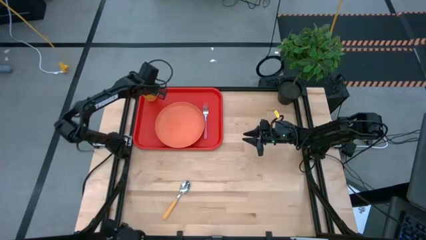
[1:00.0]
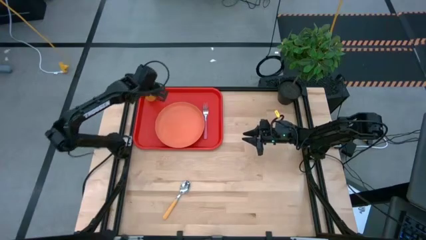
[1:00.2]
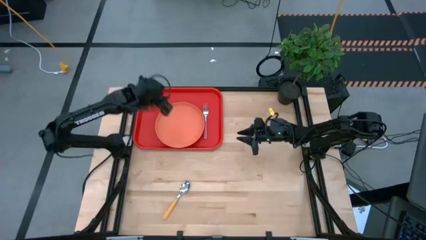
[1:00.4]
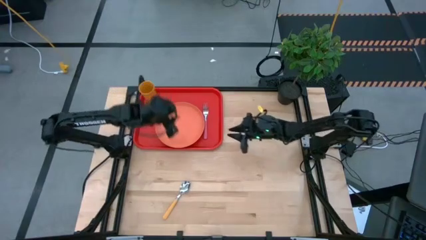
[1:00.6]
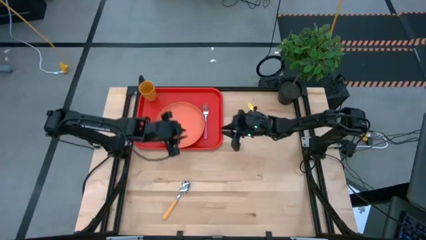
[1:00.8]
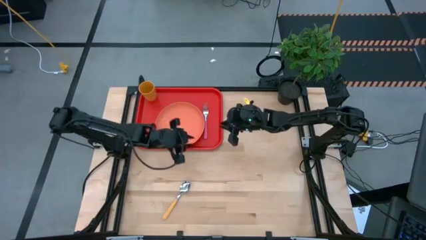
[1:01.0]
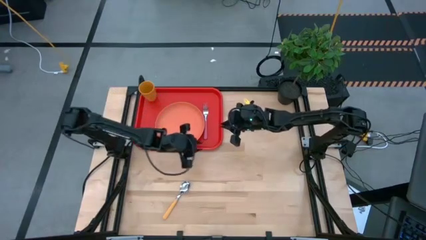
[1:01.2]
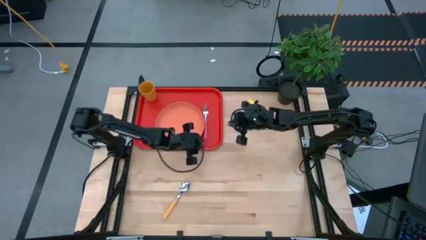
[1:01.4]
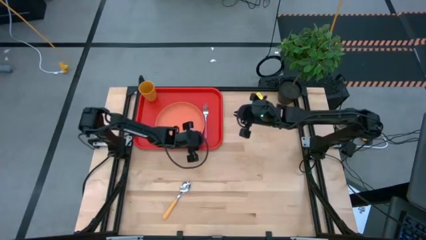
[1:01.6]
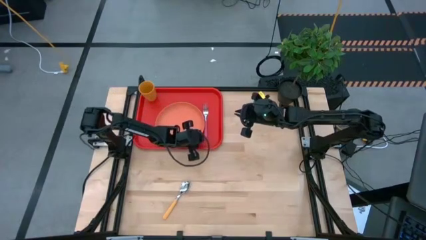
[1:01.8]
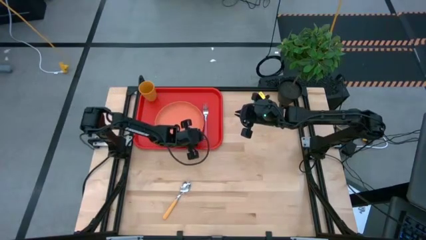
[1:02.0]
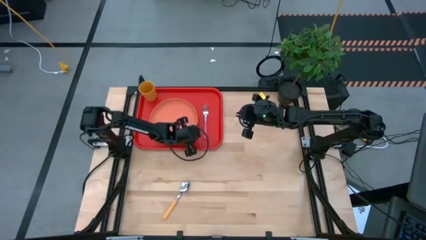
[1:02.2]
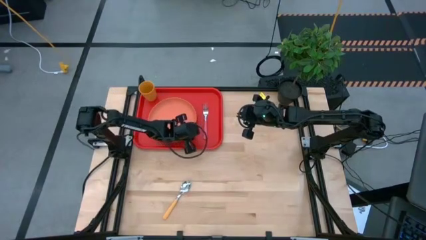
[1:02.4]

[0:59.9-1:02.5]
Task: Pick and place plate/cup/fork/spoon on tray
Adjust the orange plate

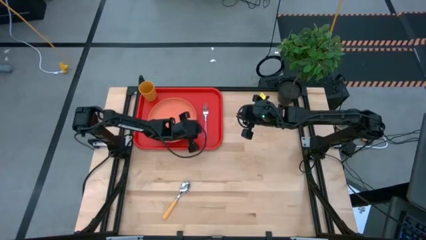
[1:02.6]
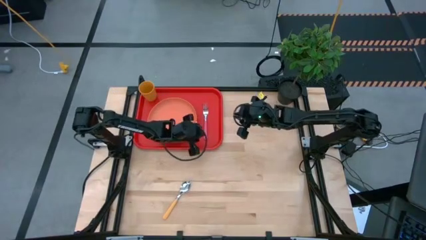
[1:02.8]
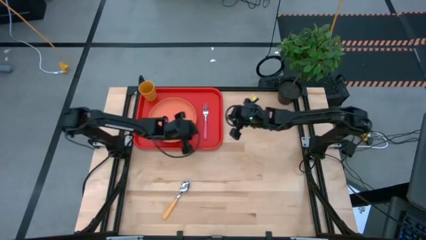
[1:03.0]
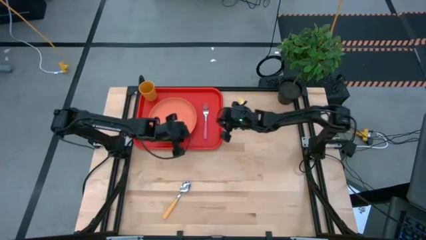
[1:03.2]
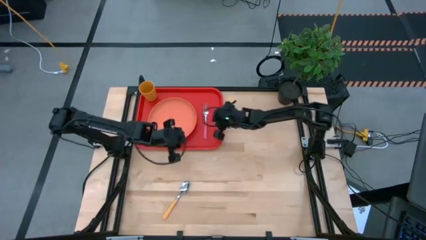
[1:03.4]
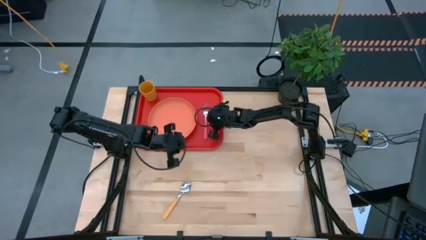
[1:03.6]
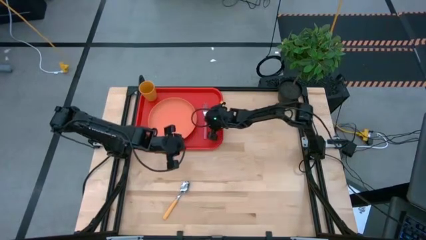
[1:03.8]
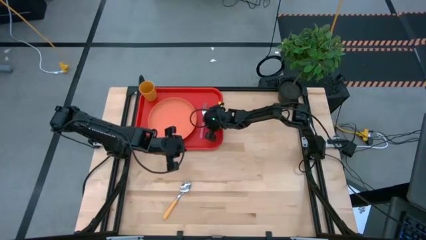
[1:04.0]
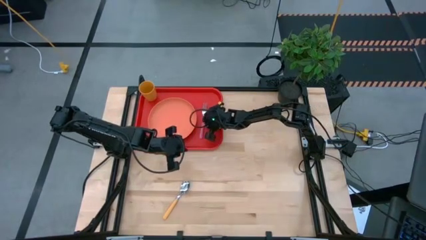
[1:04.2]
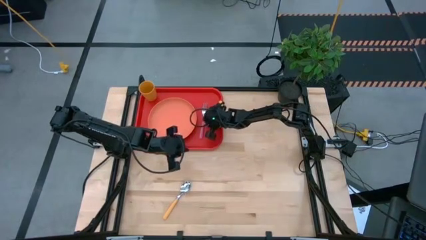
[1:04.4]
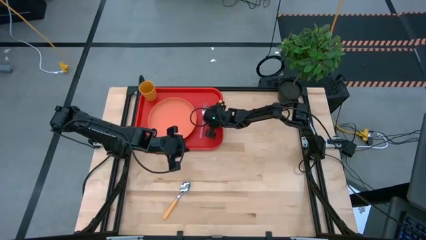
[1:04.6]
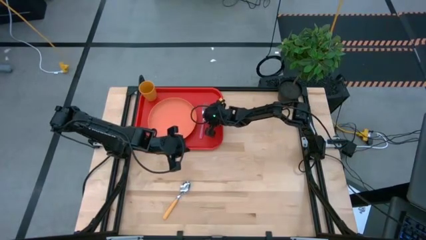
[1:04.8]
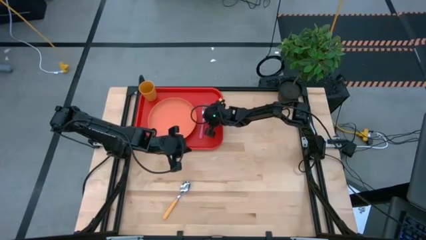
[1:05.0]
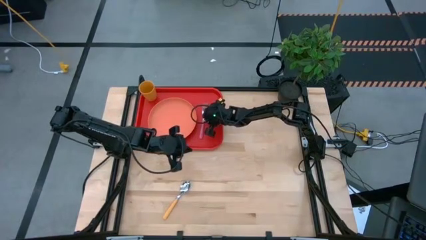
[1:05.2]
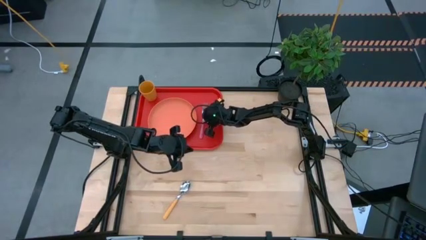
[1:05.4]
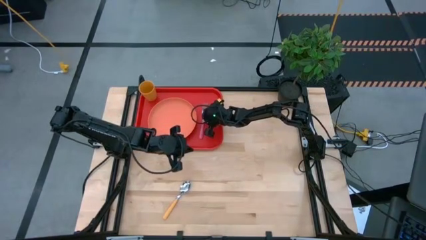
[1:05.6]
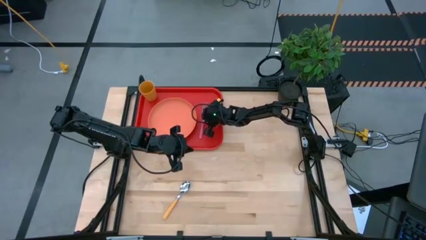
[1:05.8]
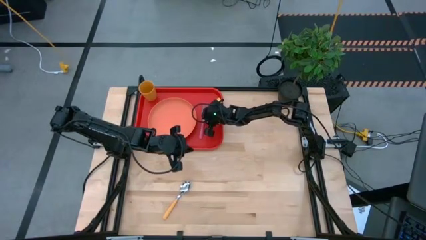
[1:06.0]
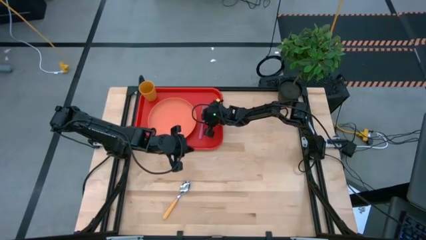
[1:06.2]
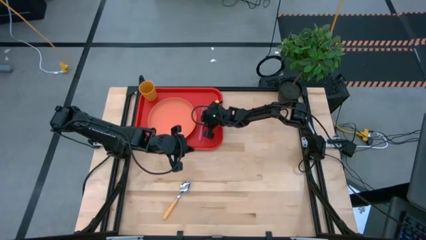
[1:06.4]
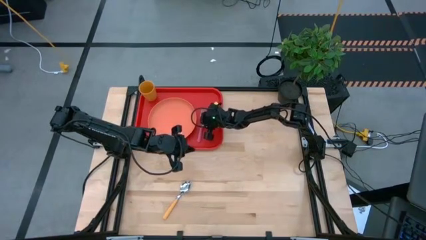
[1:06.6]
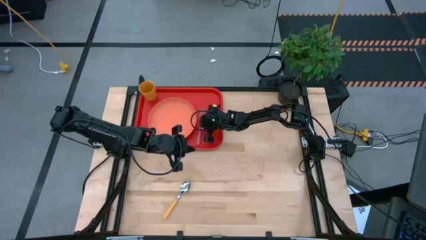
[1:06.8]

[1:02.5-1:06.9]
Adjust the pink fork on the red serving tray

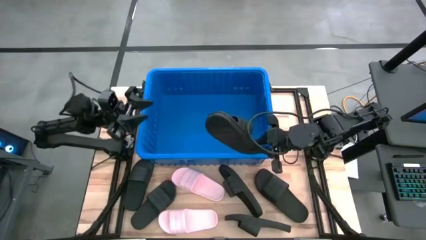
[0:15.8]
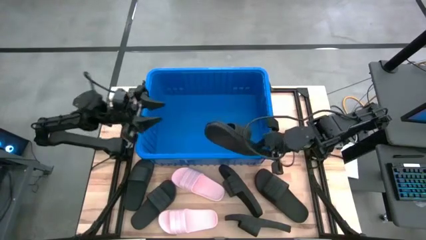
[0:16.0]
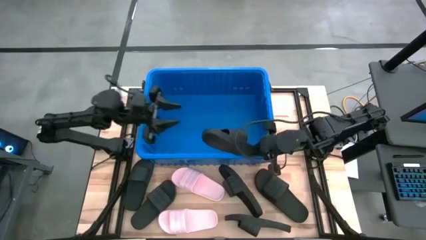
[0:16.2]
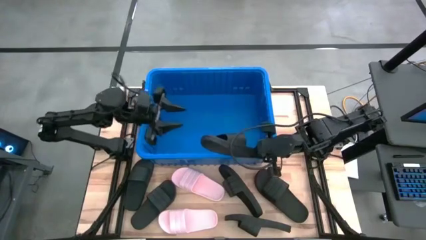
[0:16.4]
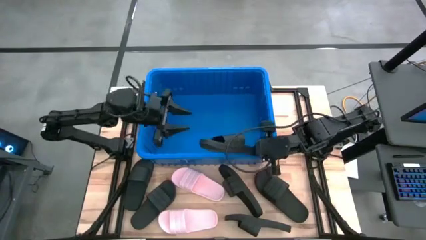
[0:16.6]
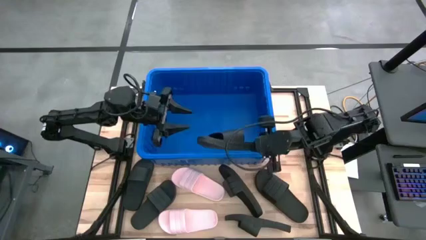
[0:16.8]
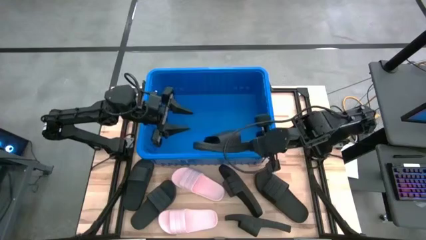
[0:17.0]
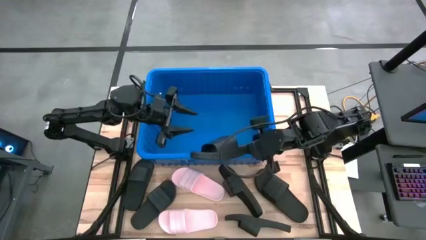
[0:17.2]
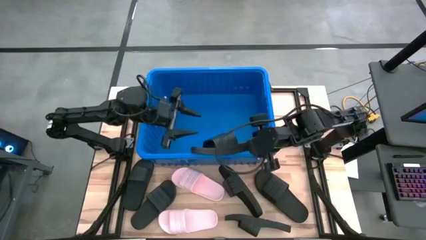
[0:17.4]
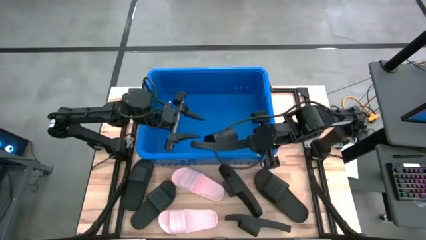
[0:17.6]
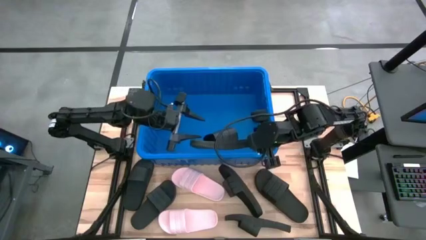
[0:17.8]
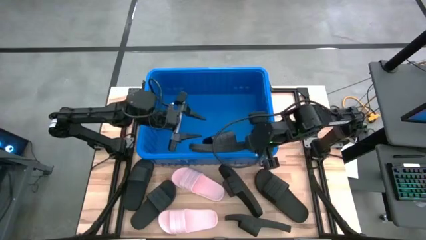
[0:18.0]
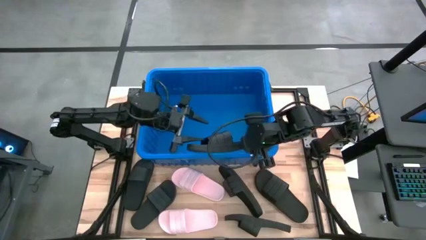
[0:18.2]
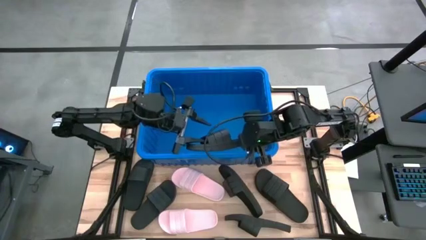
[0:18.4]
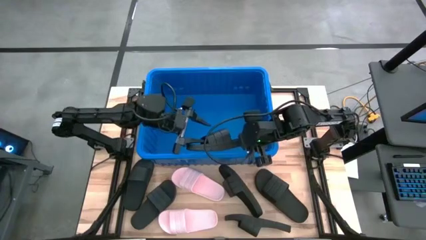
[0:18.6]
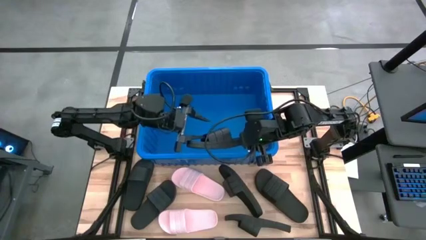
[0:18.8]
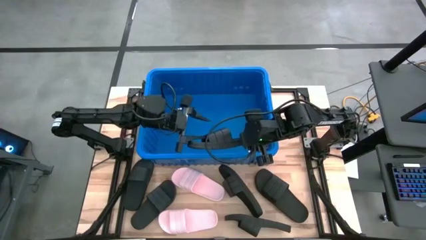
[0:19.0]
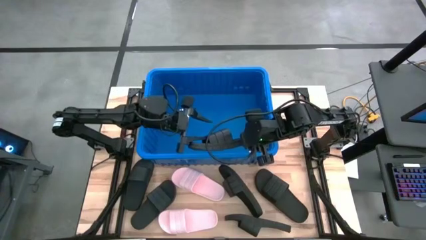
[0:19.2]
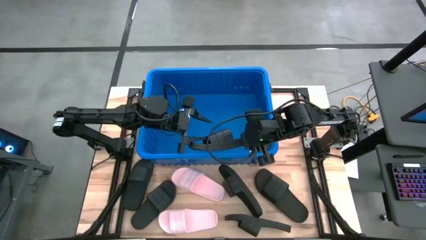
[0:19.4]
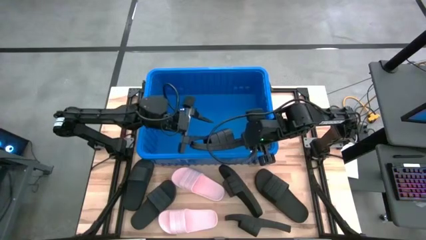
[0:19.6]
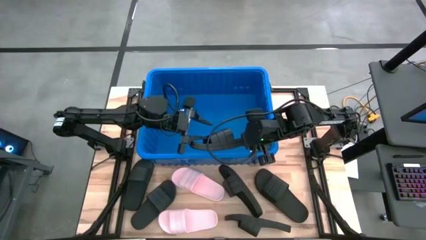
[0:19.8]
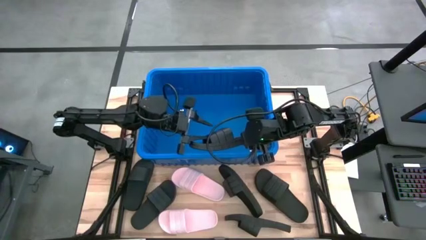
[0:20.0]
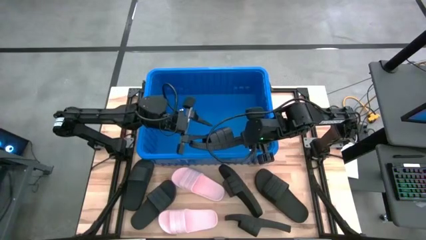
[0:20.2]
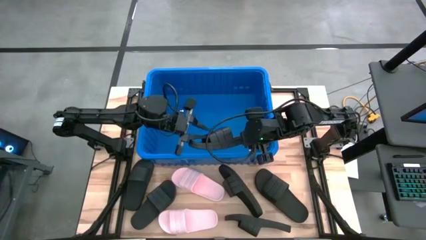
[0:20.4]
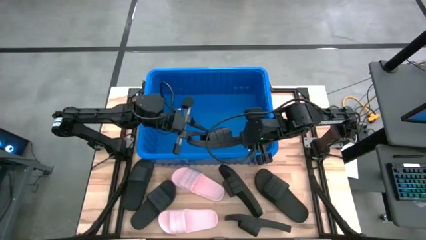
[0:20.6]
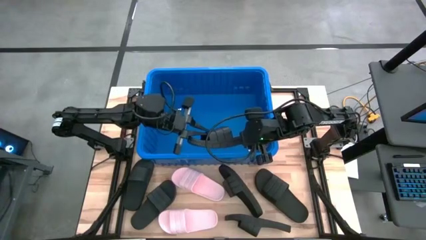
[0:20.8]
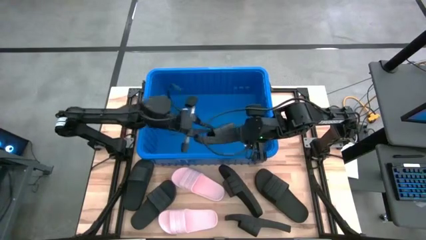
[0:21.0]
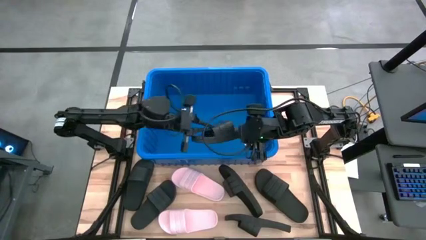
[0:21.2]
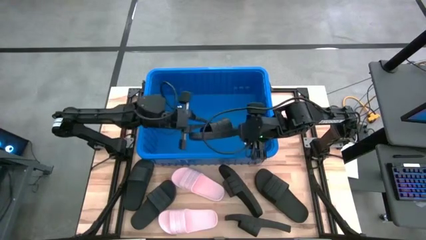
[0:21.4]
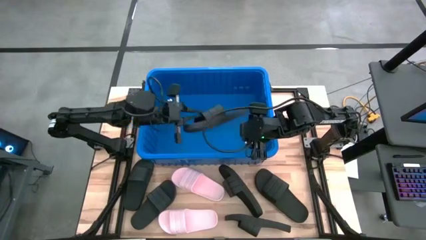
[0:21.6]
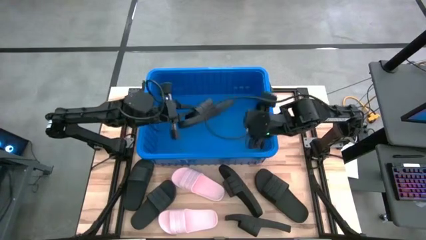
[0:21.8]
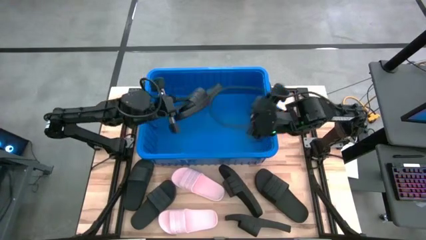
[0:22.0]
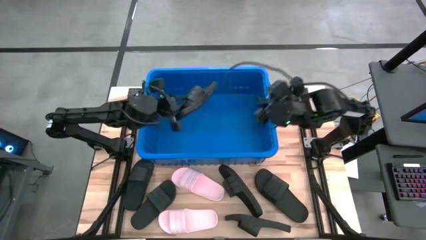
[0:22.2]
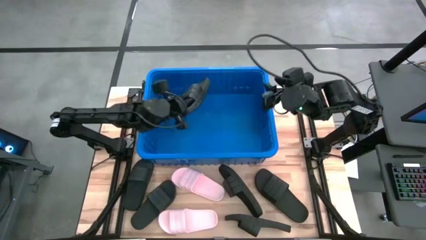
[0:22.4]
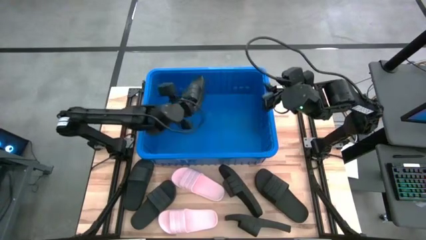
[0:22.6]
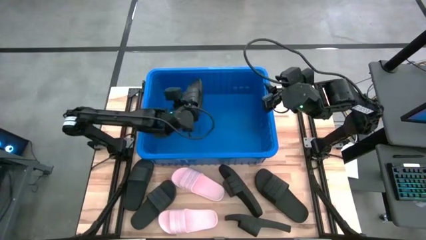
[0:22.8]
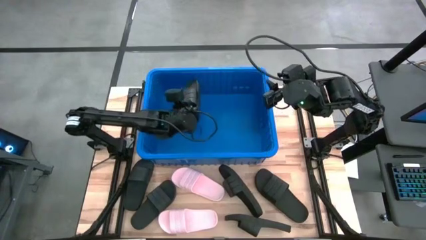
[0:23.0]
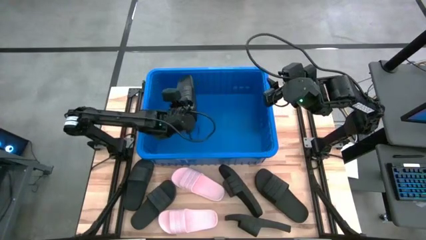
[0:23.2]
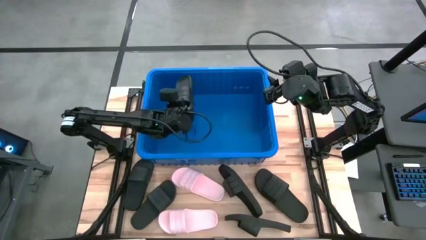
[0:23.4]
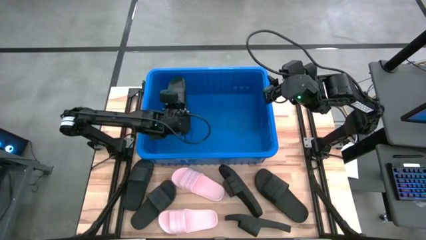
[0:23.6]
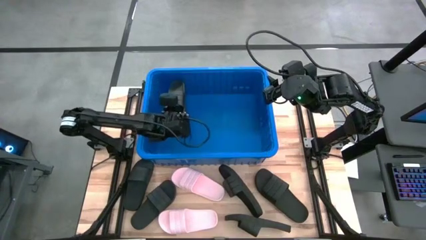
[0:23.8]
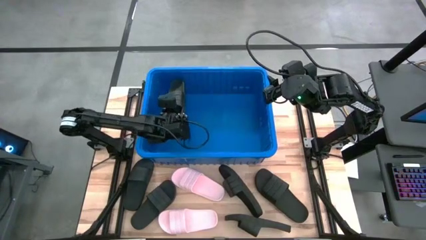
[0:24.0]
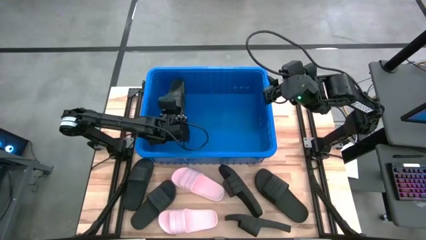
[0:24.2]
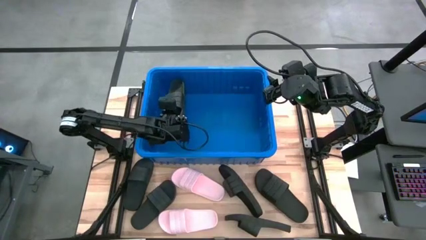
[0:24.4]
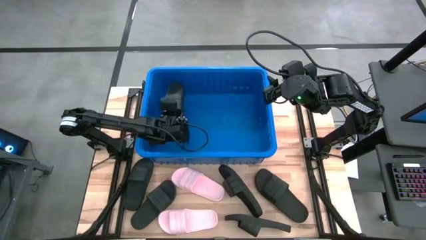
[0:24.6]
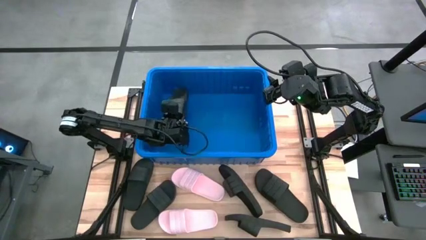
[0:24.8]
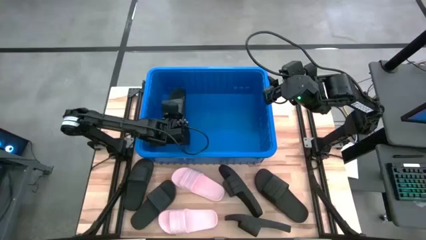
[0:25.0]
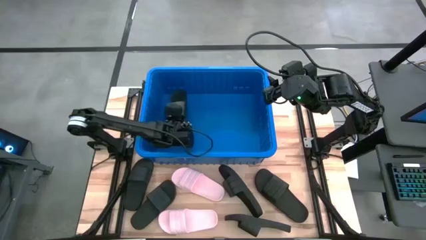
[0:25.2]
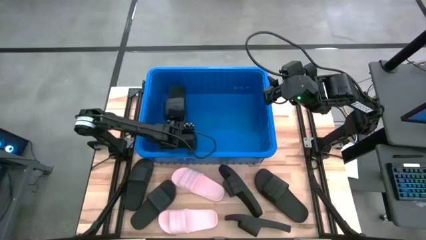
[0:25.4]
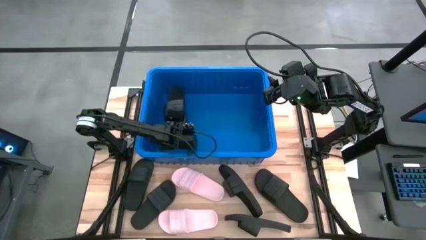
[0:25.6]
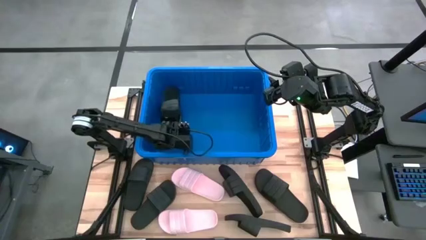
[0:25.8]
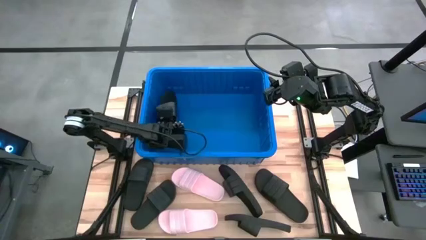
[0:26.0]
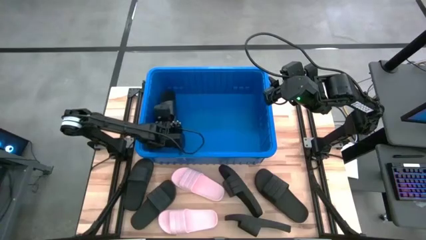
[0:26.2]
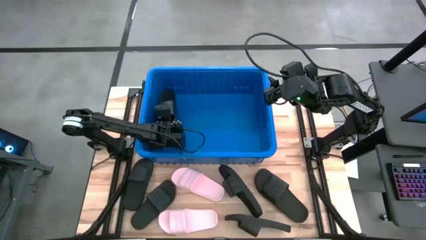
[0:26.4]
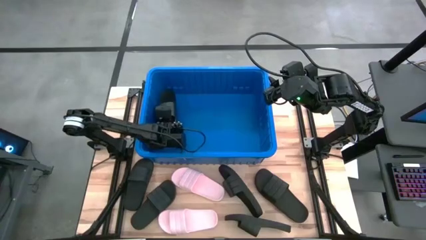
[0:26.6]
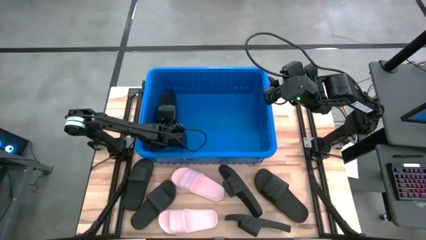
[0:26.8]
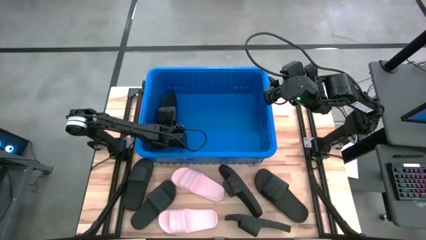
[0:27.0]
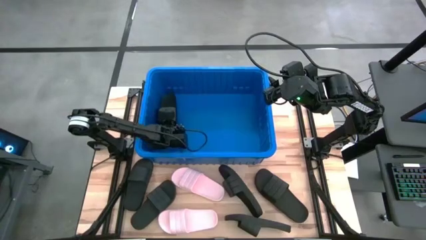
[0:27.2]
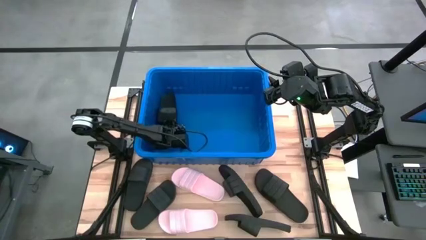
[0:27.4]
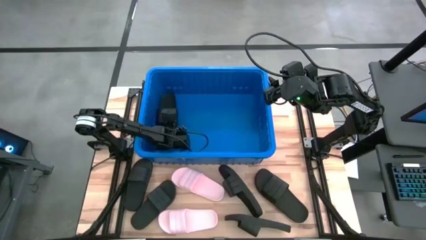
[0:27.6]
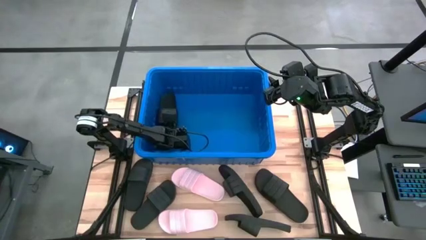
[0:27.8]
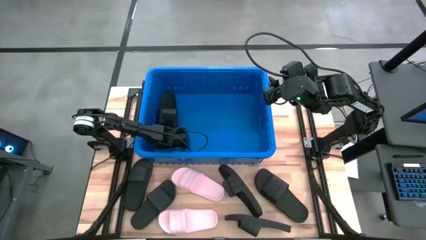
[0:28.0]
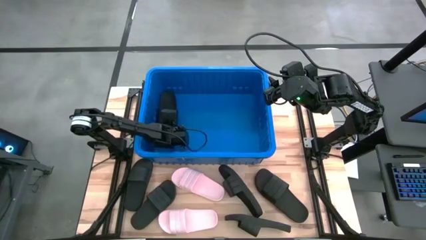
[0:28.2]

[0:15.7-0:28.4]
Task: Pick and place slides into bin
Put the black slide into the blue container
